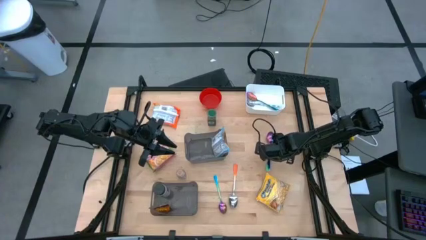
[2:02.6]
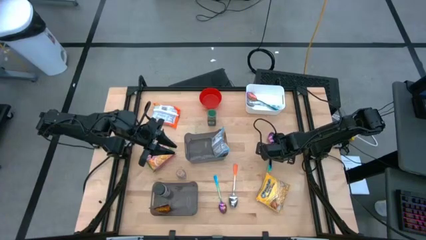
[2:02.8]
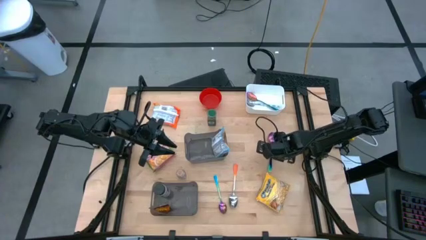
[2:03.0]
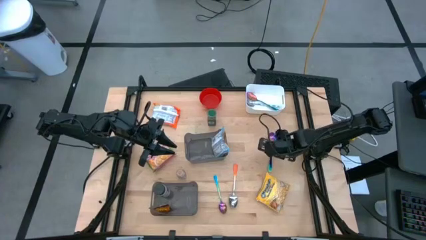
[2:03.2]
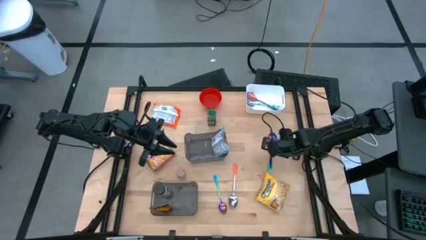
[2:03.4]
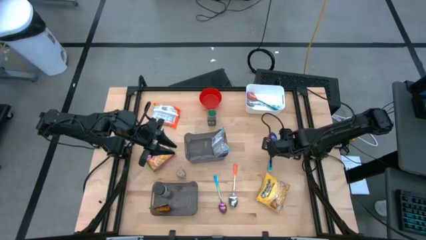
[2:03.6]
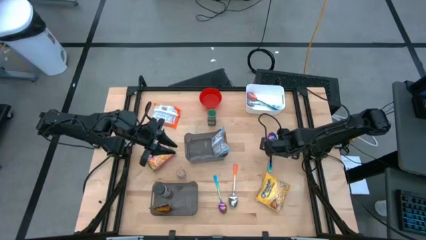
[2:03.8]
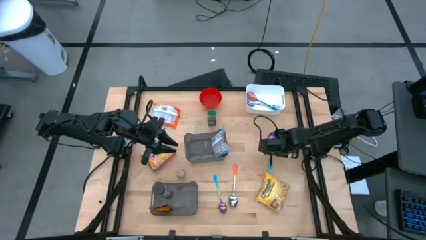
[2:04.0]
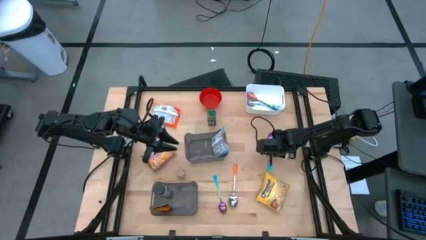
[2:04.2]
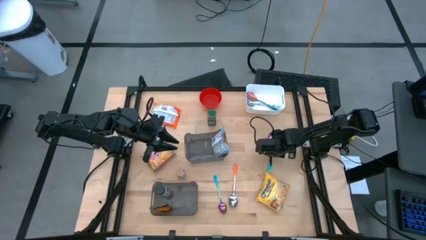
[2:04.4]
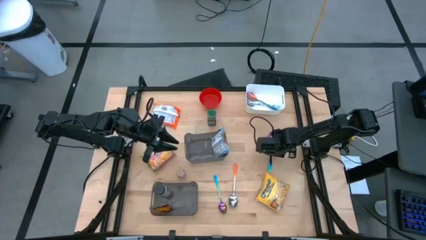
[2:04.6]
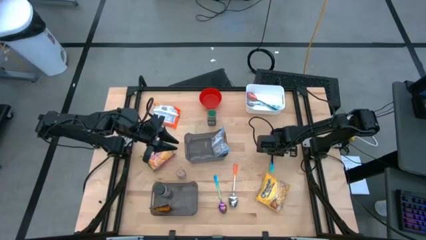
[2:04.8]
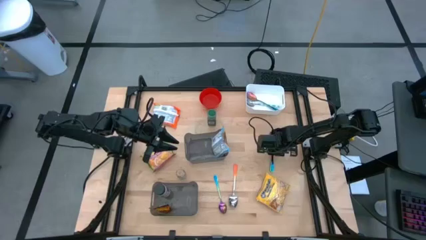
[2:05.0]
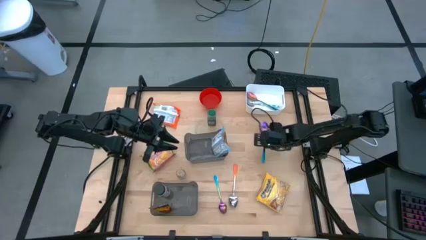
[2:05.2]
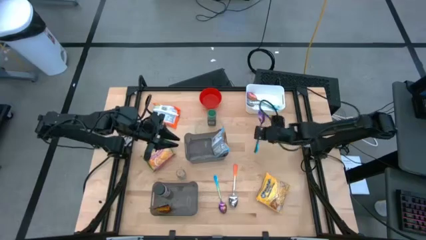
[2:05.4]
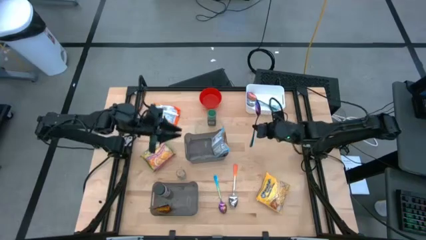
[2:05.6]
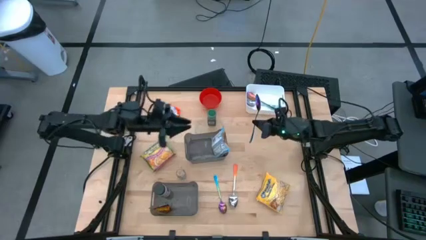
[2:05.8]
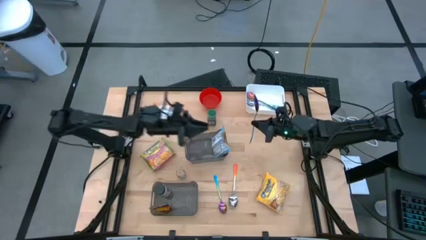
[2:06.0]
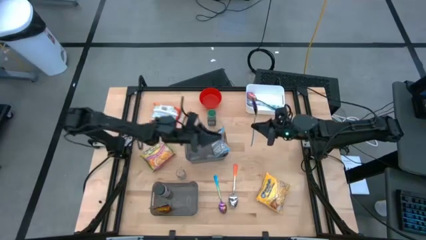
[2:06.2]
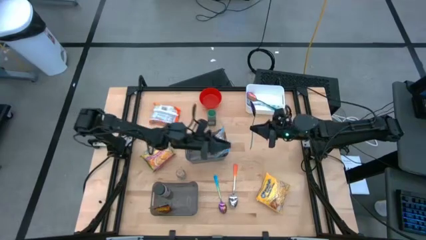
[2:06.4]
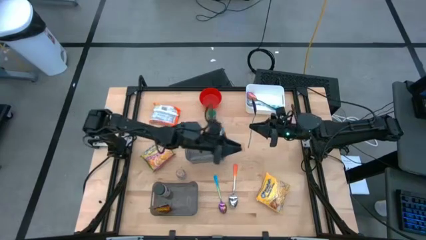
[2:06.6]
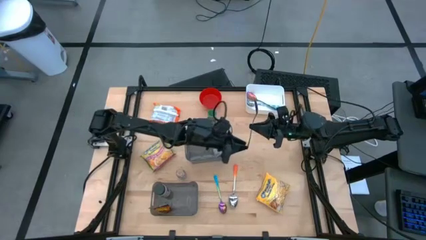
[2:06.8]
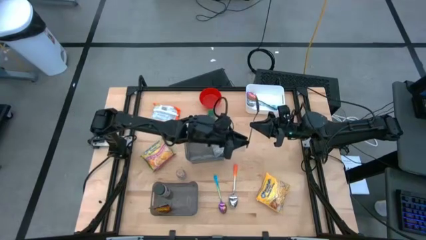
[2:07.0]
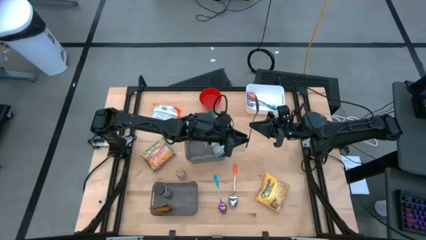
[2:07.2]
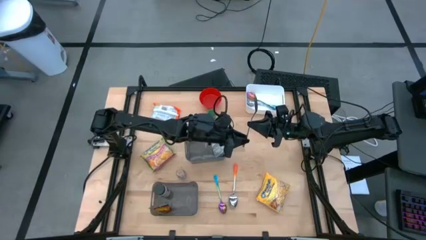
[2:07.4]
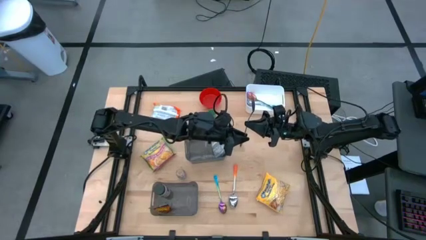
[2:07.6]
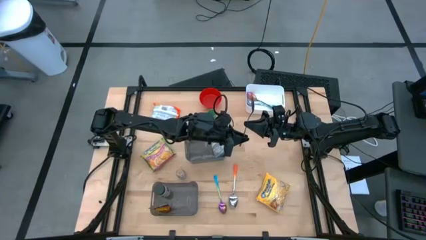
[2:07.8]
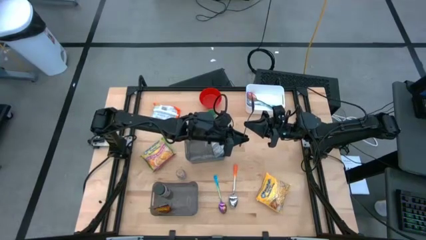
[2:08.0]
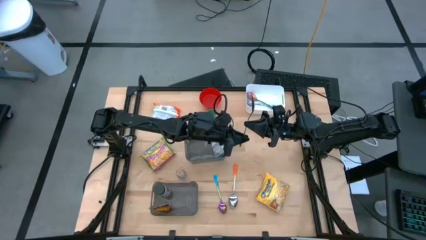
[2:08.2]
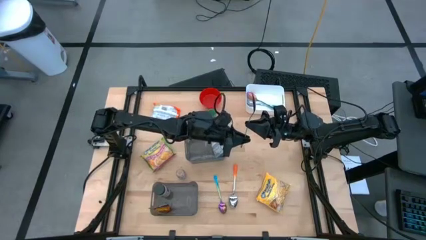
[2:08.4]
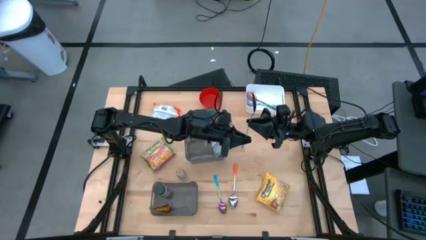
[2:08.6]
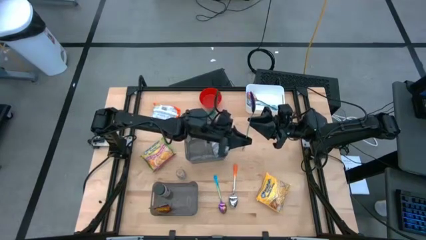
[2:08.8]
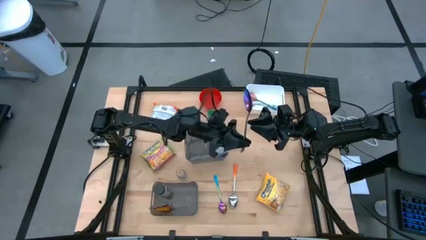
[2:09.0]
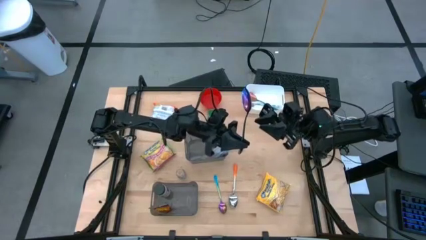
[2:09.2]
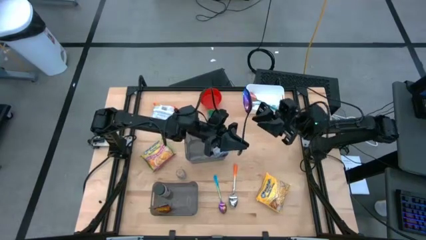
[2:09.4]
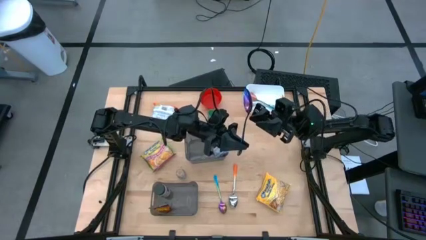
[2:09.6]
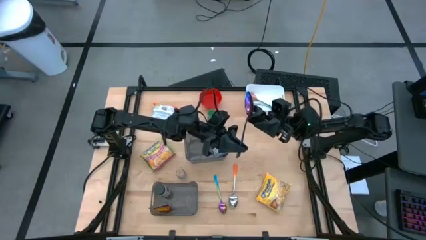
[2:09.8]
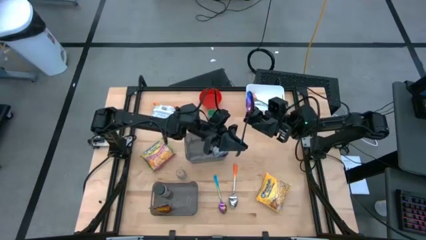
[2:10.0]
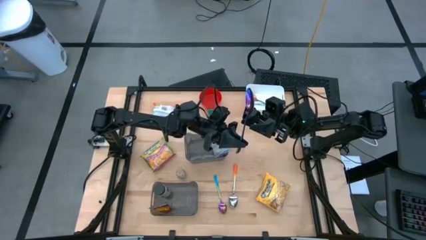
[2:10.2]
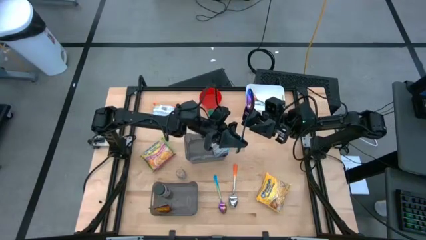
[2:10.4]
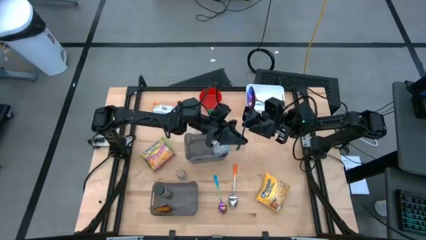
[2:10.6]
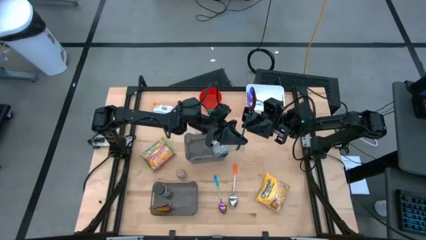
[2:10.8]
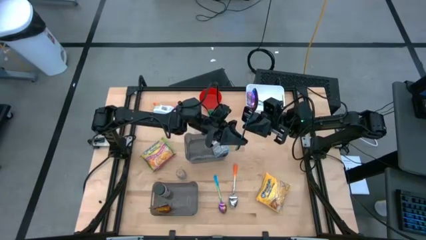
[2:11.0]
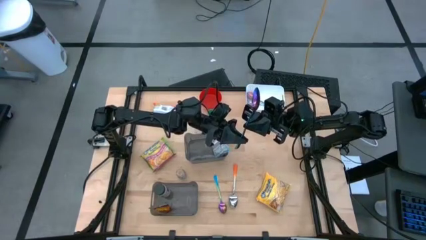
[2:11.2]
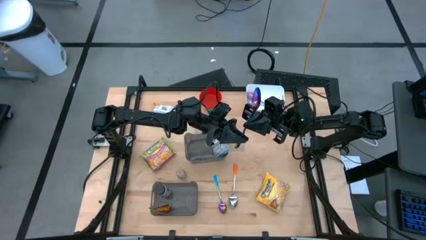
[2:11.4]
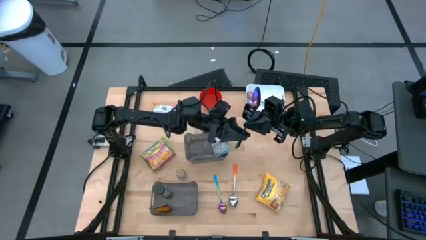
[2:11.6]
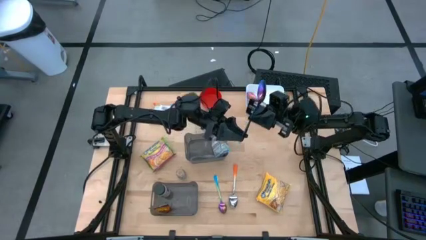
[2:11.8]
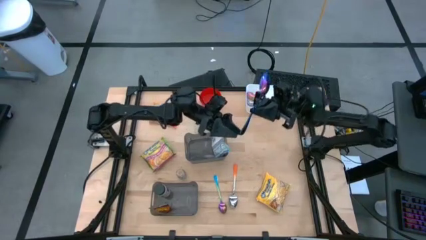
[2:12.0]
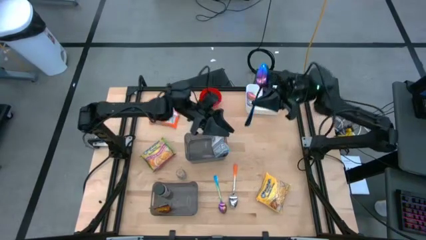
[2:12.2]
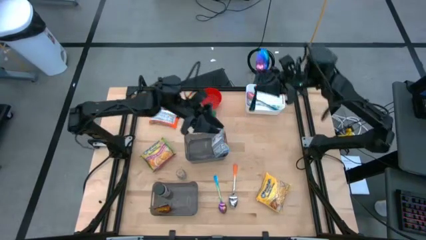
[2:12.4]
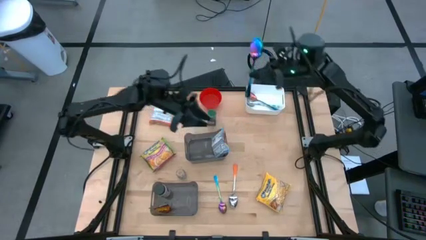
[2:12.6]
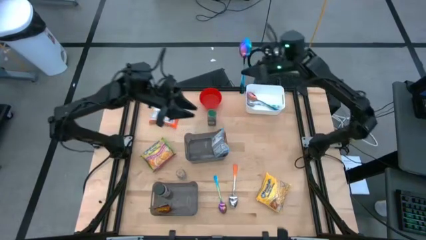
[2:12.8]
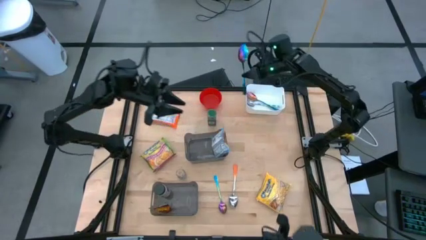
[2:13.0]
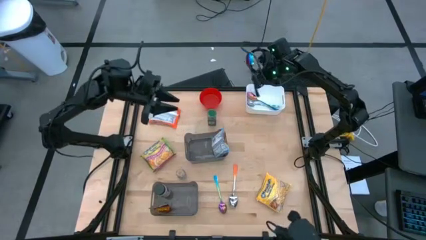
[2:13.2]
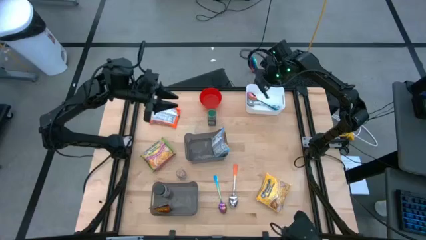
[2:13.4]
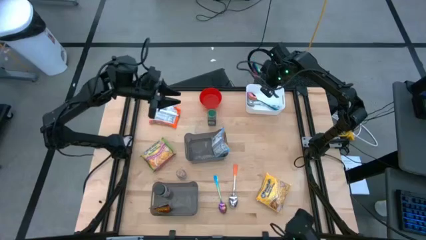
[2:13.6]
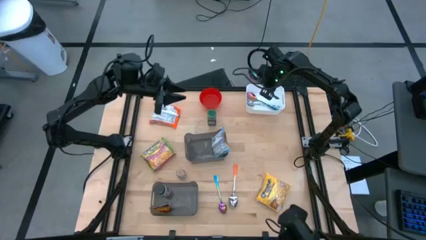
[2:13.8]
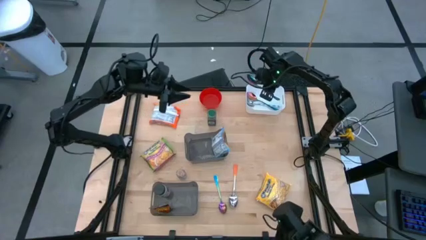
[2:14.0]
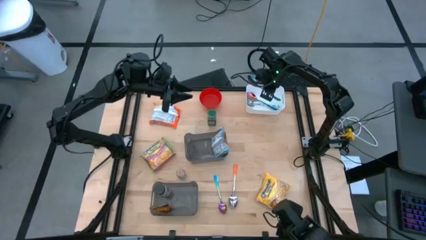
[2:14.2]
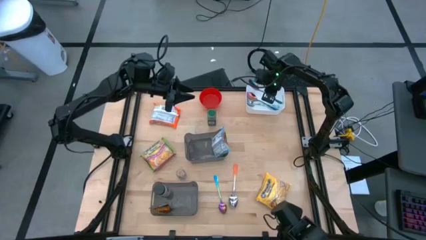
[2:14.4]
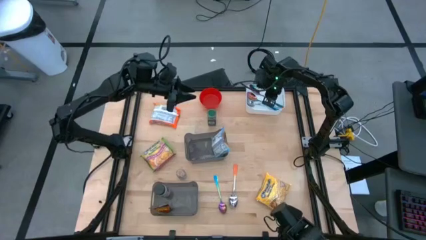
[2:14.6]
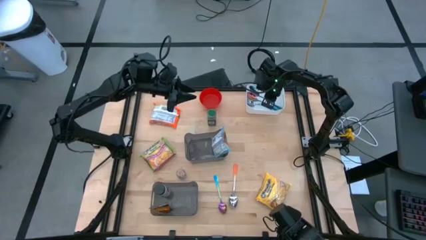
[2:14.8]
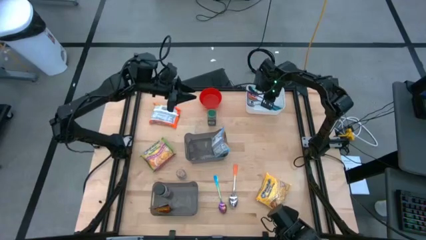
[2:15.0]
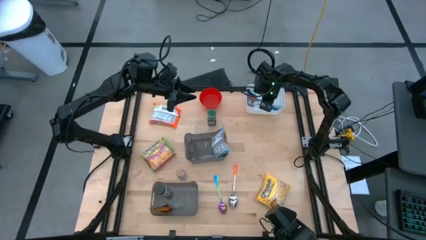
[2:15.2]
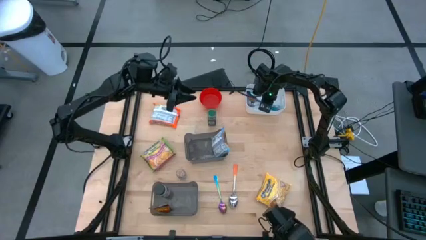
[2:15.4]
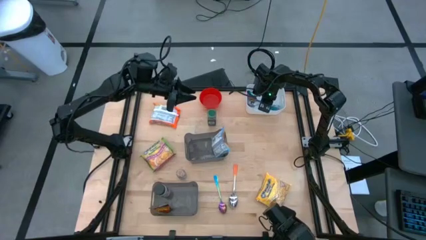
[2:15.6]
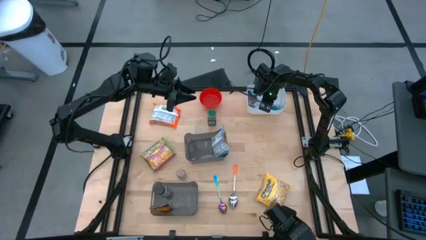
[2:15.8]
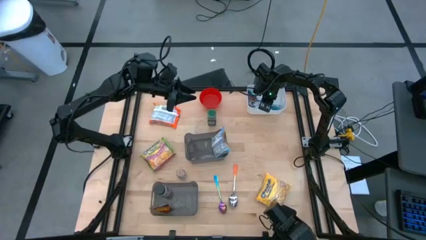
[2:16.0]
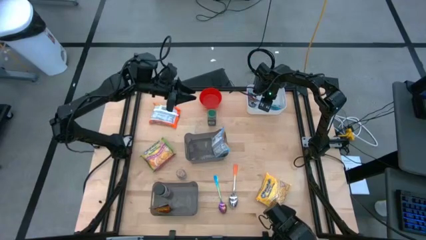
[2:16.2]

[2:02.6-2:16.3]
Task: Pick & Place Food Item
Put the top purple spoon into the white bin

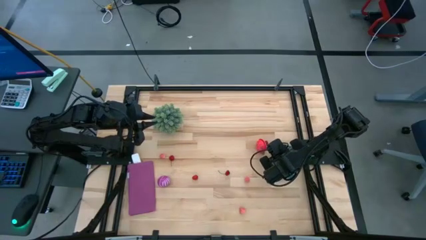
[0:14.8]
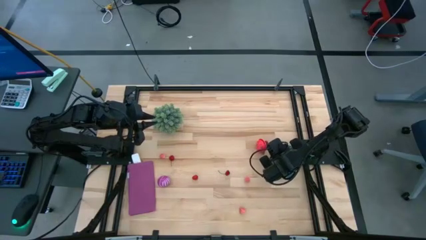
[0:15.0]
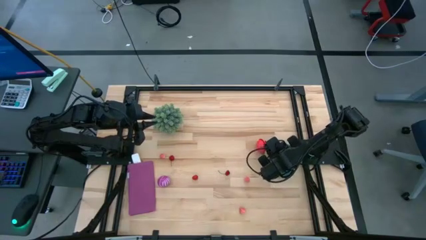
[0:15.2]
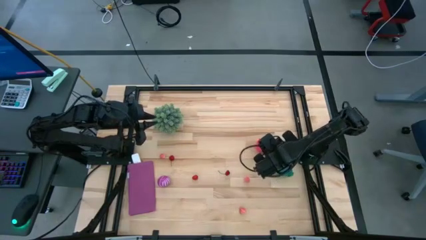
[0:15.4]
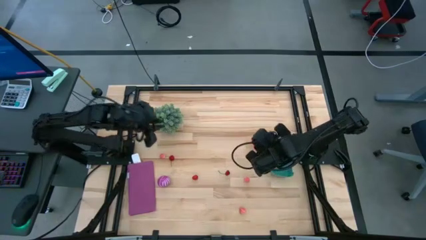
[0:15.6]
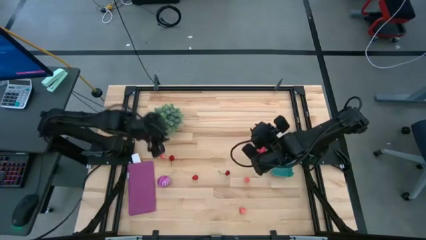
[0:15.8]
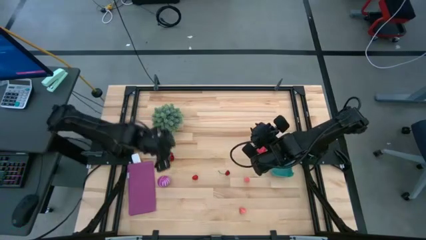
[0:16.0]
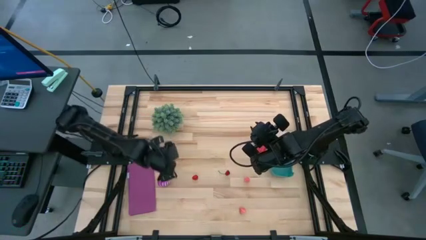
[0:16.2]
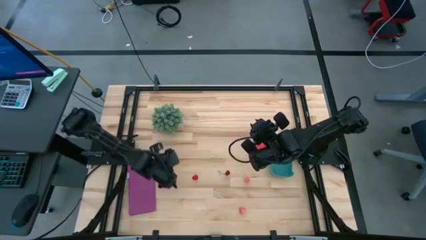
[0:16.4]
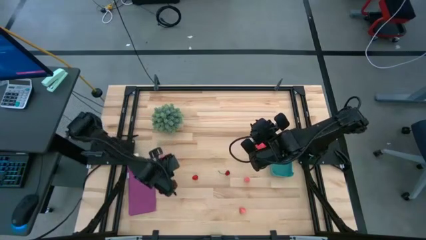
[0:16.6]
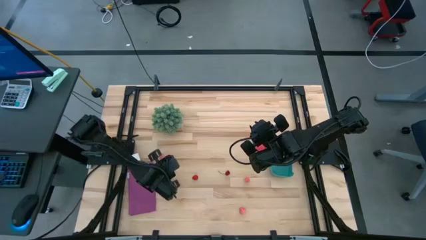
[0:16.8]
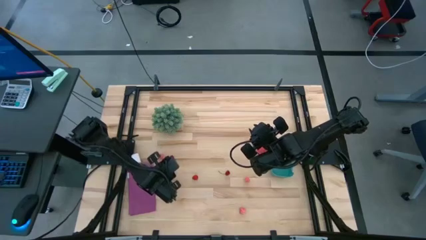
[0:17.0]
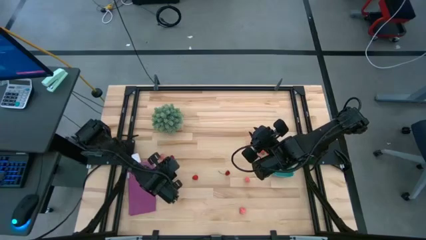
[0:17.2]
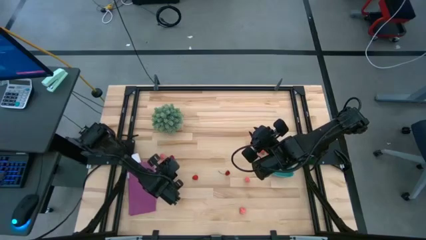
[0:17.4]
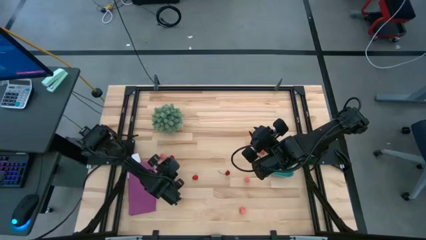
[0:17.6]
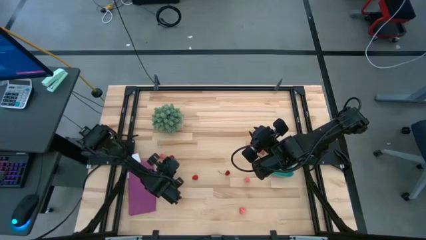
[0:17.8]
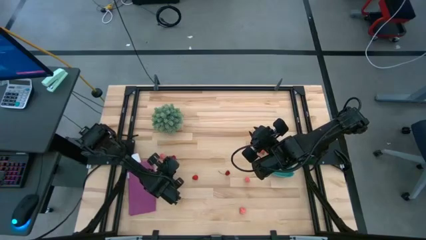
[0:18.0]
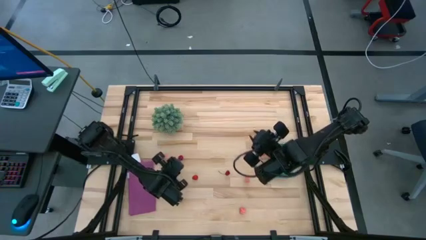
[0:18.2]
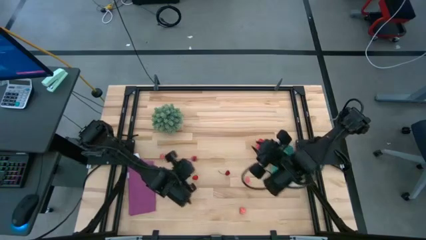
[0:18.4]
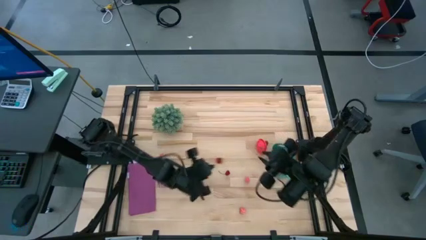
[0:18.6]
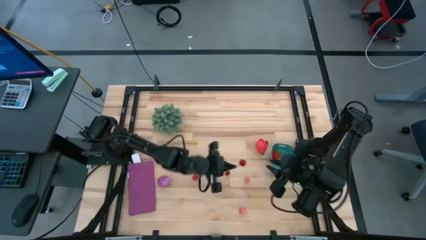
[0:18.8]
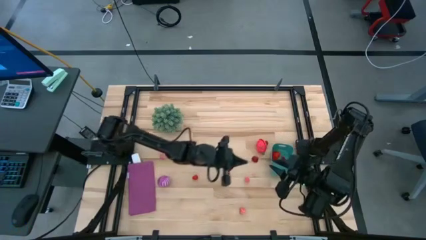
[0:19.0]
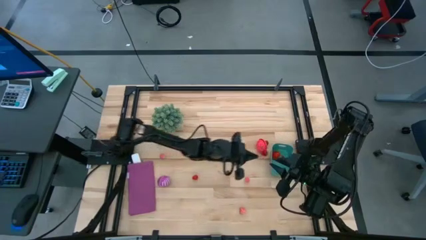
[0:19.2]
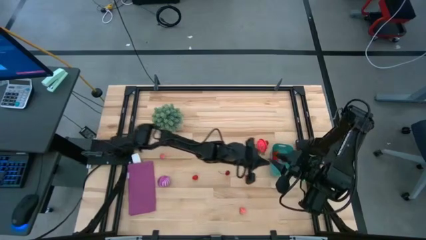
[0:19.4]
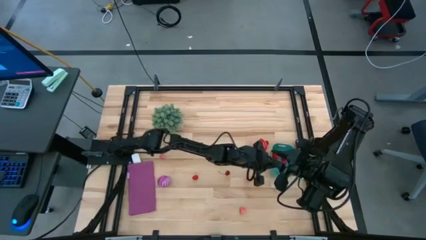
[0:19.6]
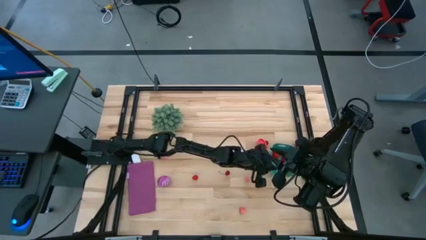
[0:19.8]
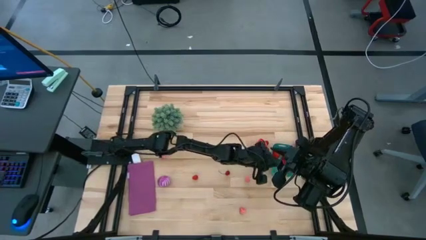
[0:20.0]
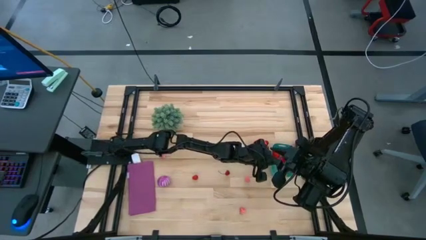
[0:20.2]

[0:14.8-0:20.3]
Task: Pick and placing Produce into tupperware
Put the red cherry into the green bin
